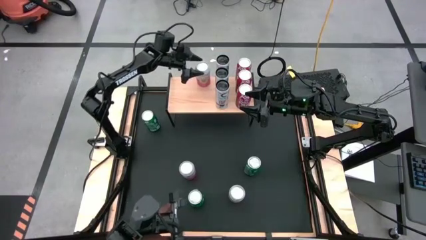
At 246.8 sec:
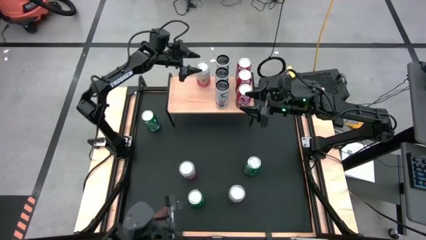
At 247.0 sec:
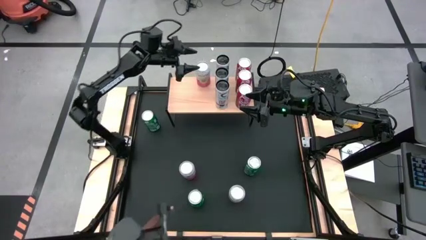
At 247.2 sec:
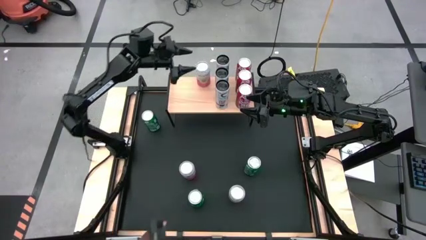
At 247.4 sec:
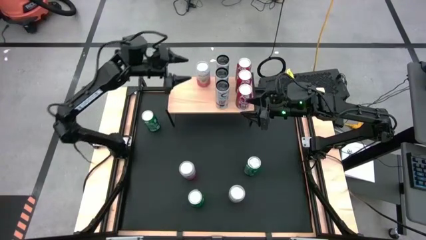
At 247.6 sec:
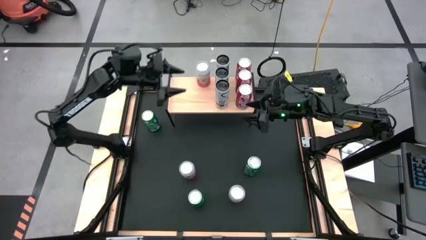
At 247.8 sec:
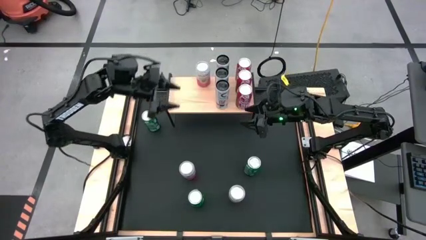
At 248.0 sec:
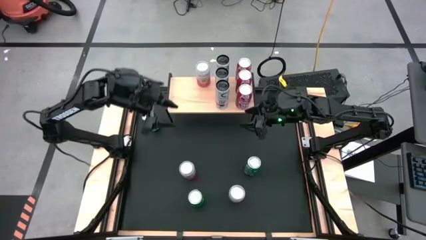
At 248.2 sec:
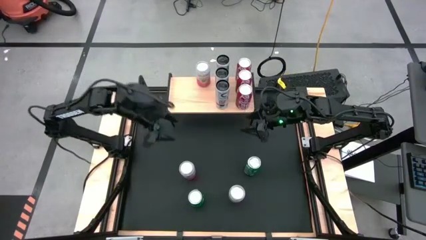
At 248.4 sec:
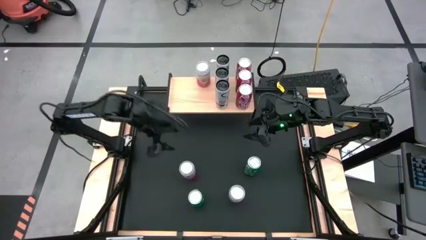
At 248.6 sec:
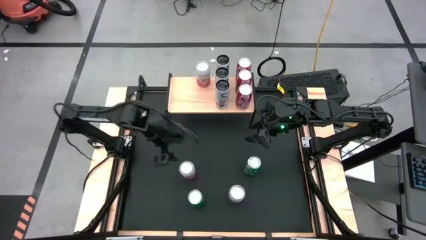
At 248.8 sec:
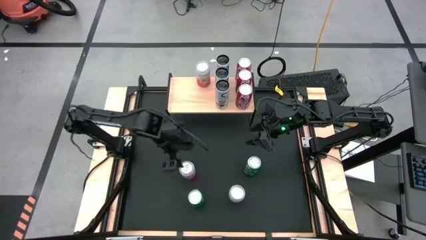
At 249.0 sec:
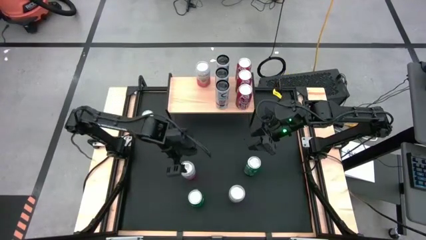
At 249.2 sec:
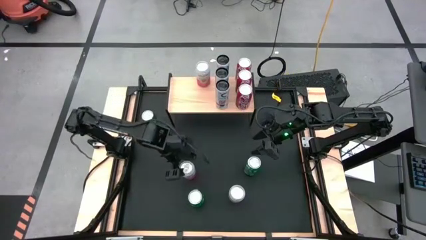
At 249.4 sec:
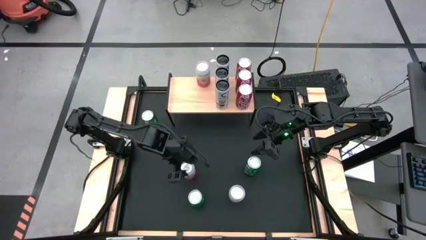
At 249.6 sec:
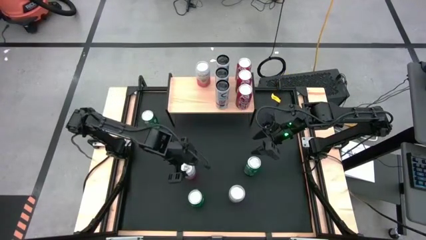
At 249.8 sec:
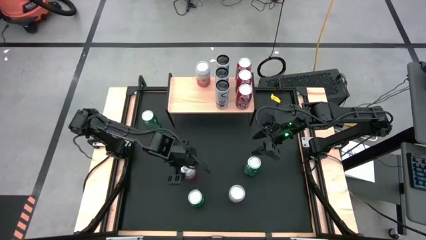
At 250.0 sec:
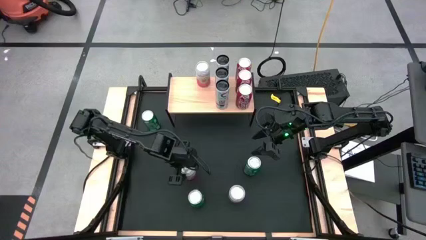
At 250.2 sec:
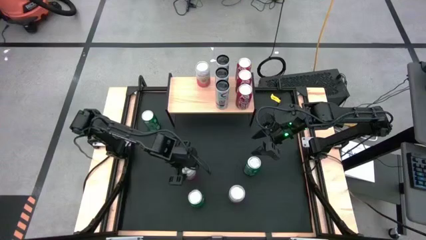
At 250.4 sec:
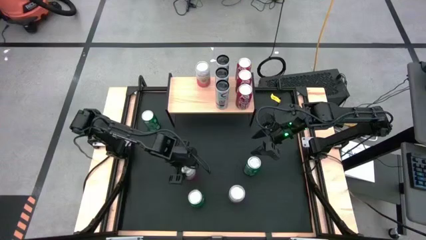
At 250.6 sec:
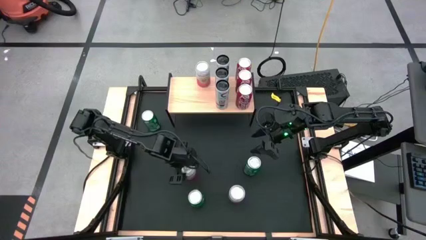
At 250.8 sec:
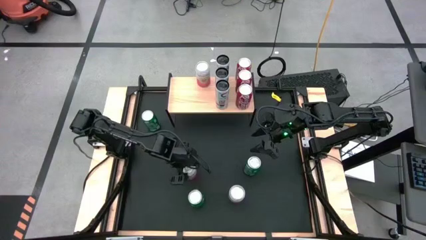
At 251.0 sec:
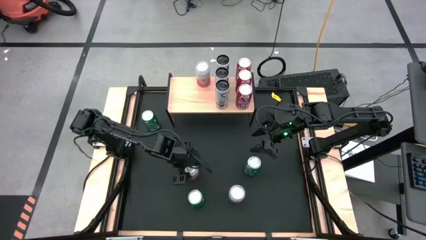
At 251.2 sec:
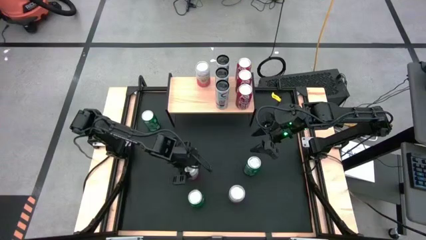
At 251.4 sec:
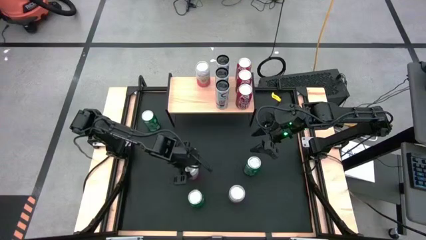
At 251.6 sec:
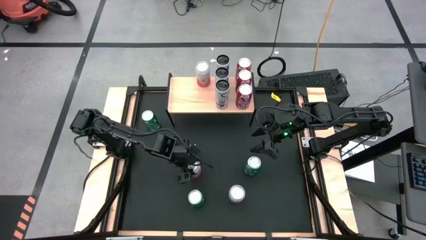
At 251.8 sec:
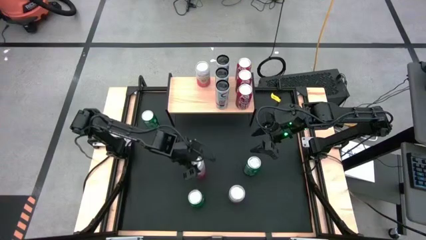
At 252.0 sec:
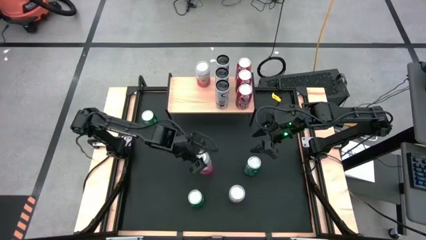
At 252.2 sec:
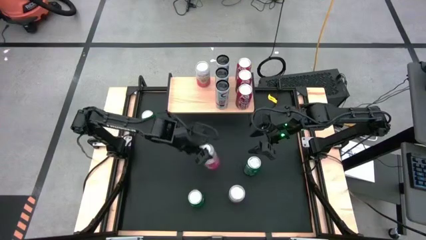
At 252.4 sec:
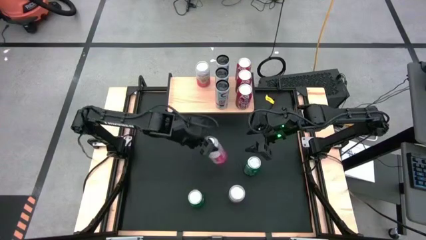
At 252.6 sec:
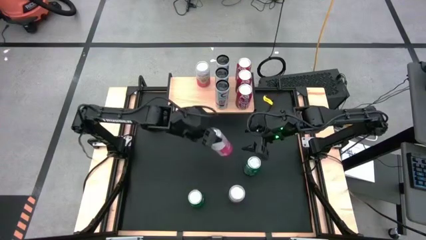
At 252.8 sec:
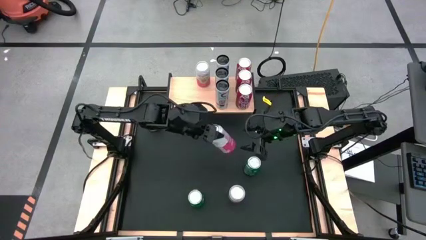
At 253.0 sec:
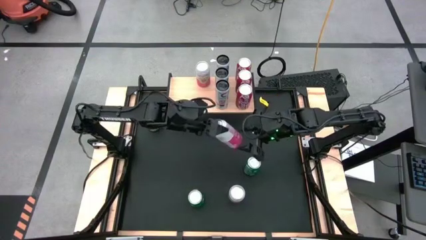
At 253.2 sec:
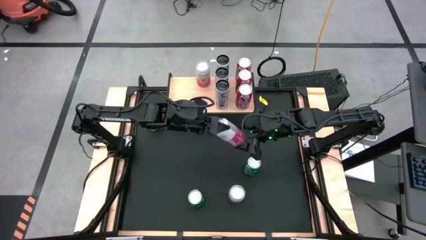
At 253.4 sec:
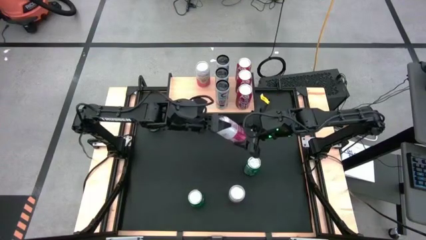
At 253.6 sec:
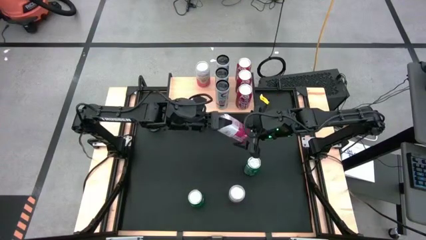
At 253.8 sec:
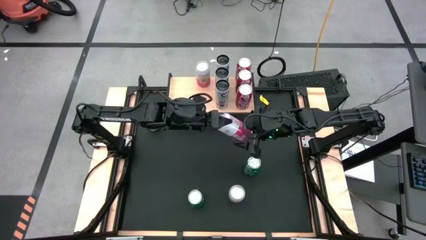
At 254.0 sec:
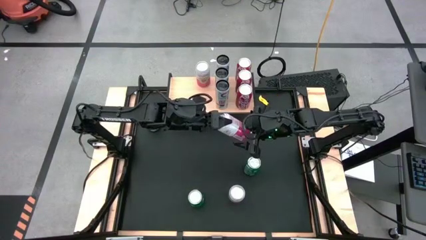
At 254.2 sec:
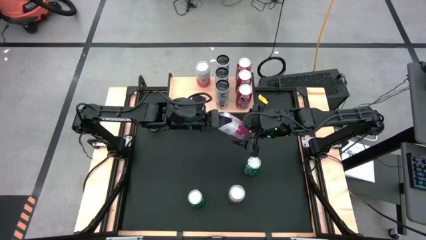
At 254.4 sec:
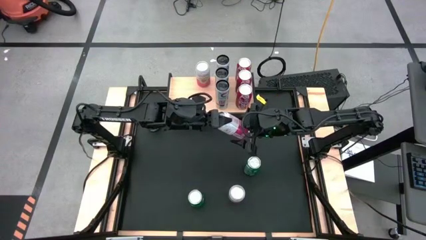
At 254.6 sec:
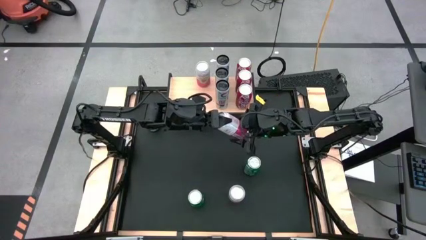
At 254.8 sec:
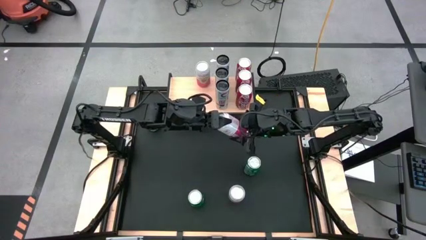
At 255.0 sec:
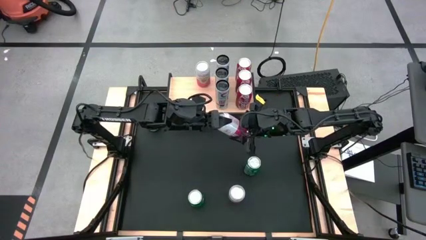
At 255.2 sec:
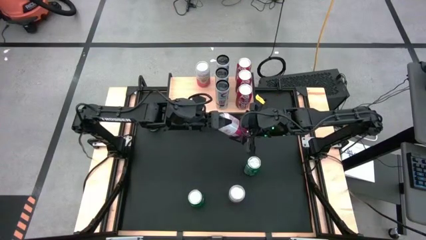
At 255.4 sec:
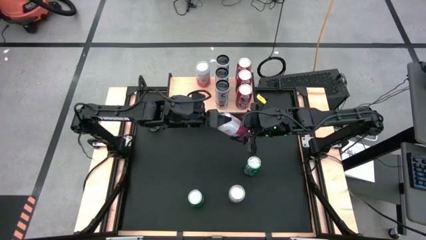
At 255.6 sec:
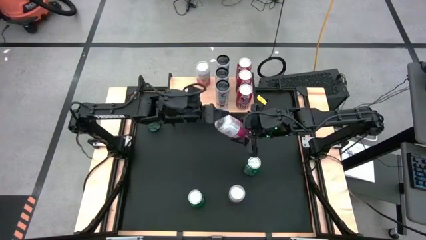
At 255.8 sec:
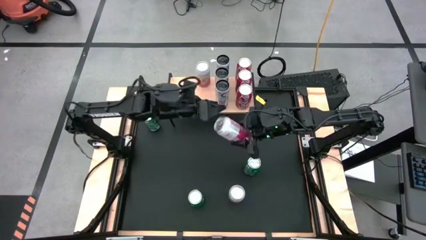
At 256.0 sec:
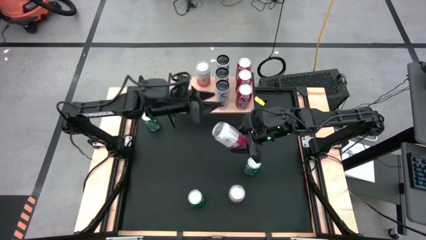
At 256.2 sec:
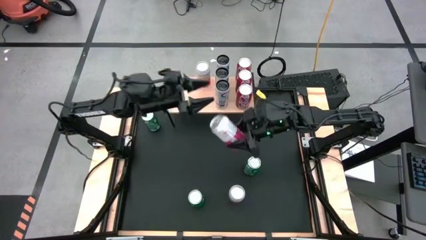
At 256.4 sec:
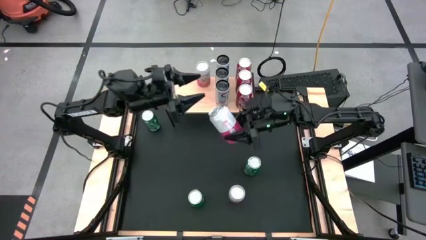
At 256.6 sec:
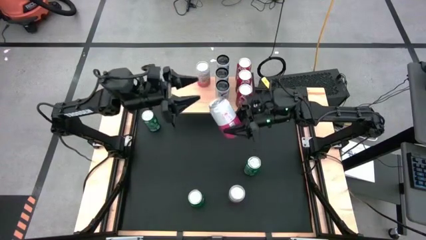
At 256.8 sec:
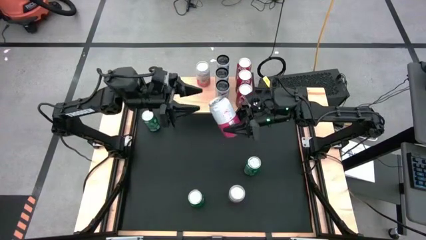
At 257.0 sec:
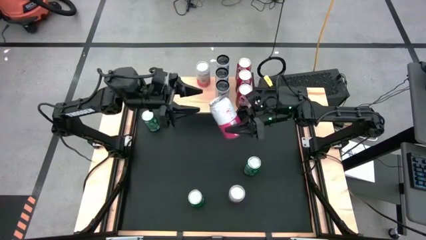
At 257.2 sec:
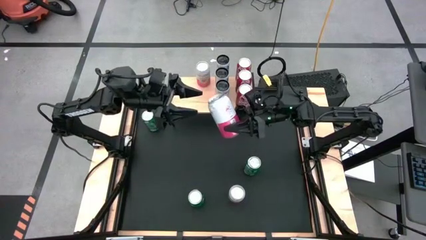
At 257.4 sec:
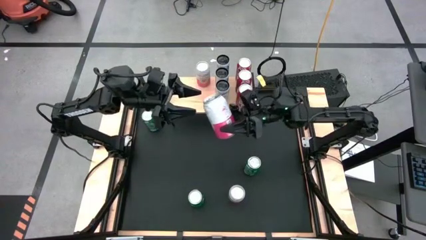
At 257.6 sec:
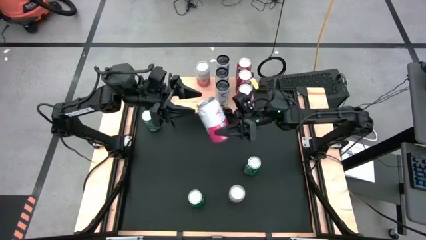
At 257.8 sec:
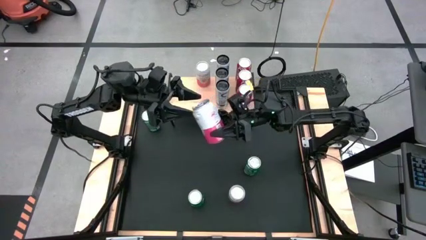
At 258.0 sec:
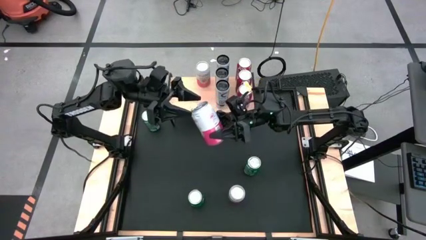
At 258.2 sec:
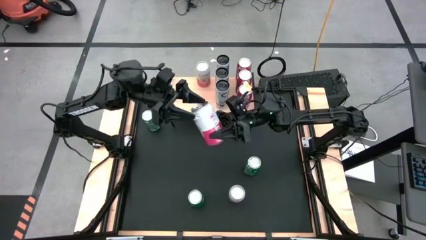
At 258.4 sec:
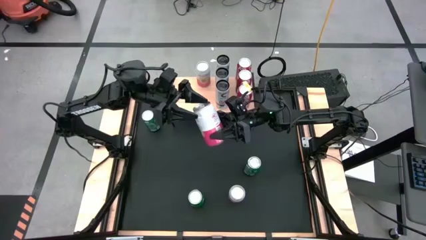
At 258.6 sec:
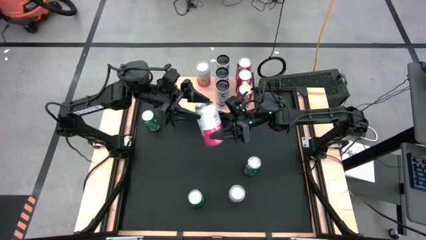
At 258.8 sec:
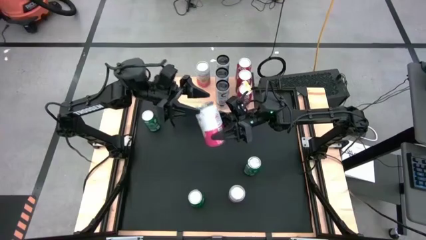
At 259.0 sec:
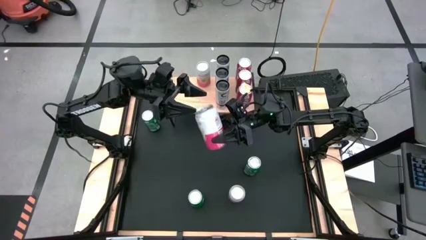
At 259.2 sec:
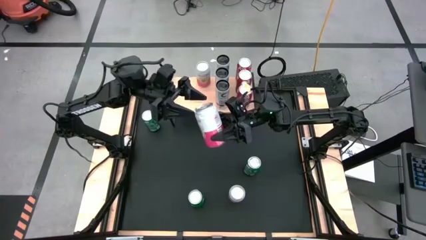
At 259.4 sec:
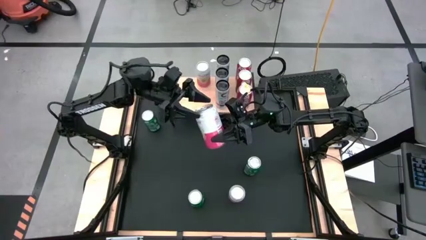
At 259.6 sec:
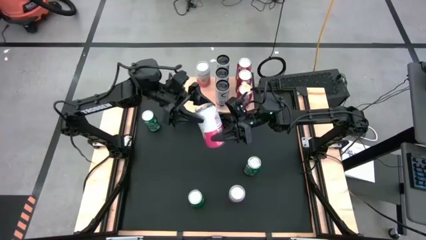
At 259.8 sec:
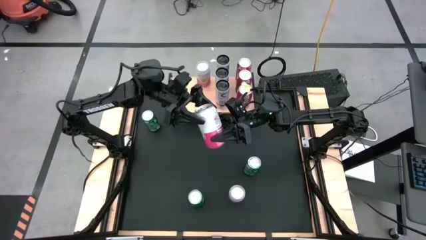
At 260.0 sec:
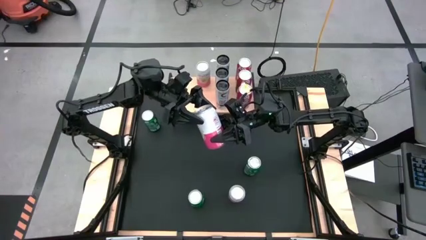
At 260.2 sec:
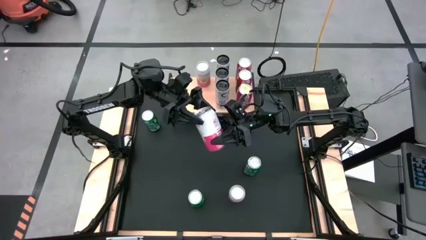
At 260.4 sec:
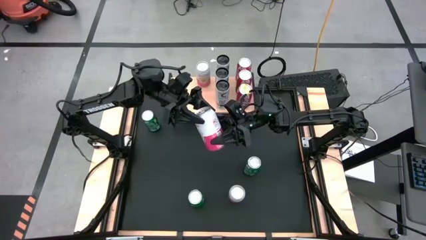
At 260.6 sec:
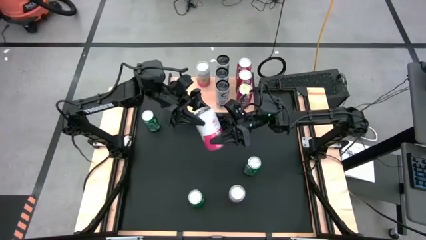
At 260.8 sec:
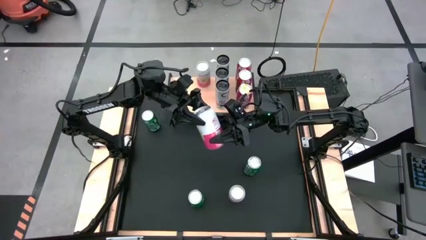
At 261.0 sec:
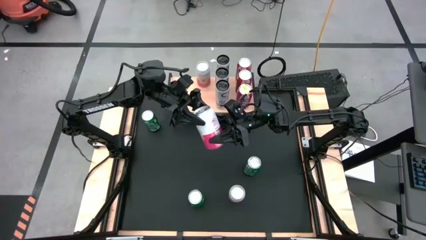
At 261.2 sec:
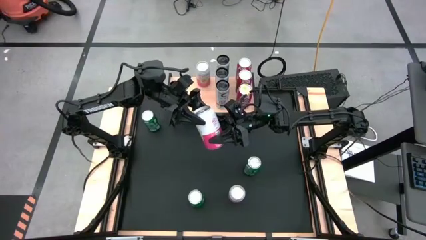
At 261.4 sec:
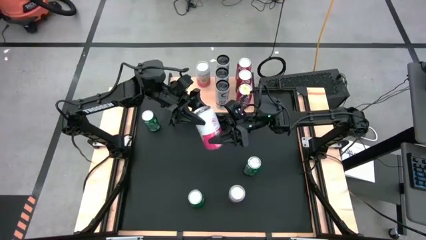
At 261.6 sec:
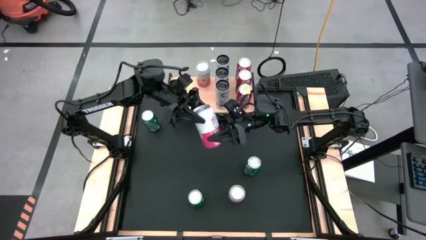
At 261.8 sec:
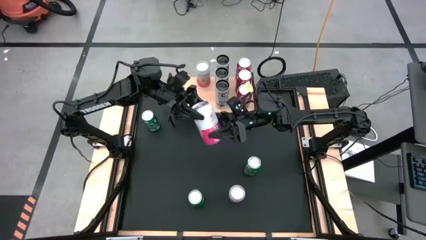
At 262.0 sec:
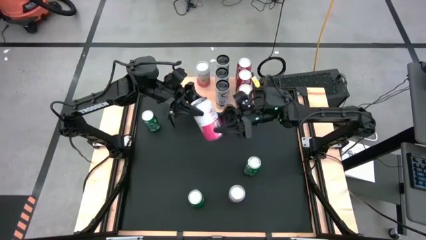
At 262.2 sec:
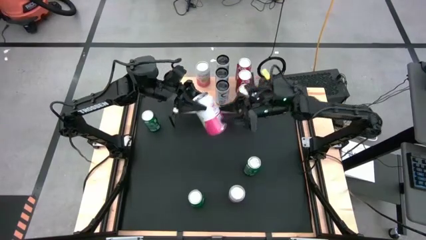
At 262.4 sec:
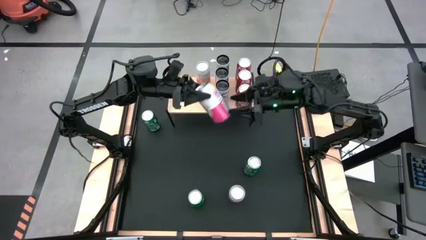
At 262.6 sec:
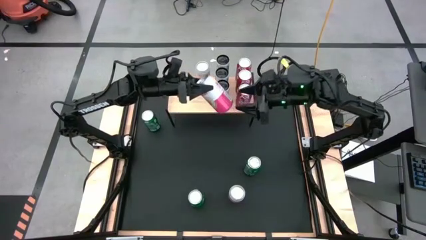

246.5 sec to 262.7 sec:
Task: Place canned beverage on shelf
Put the top pink white soda can aligned with the other pink white soda can on the shelf
